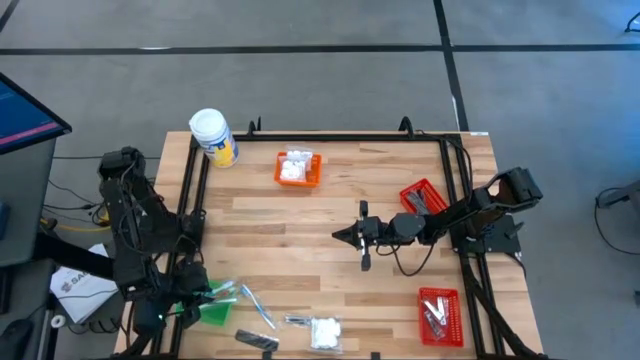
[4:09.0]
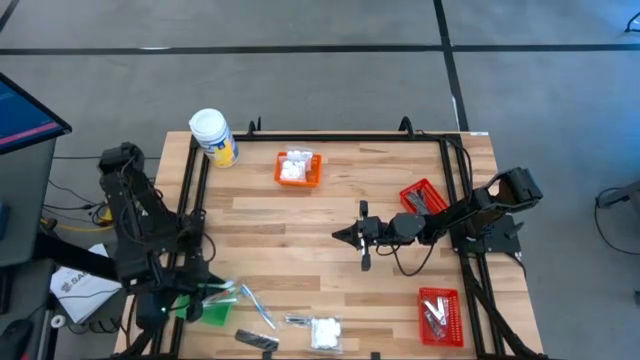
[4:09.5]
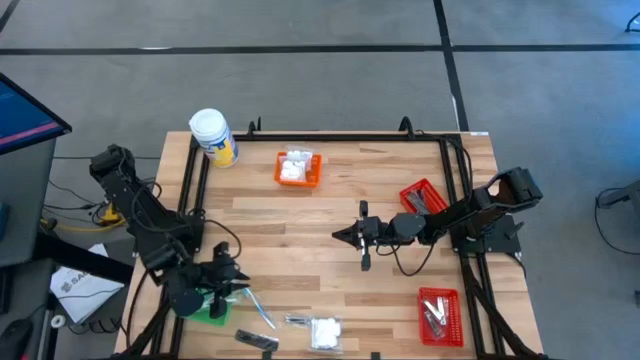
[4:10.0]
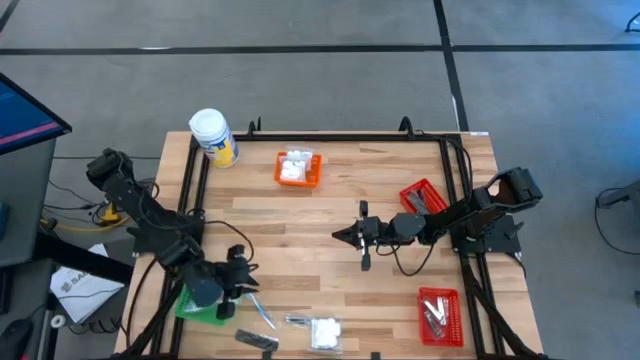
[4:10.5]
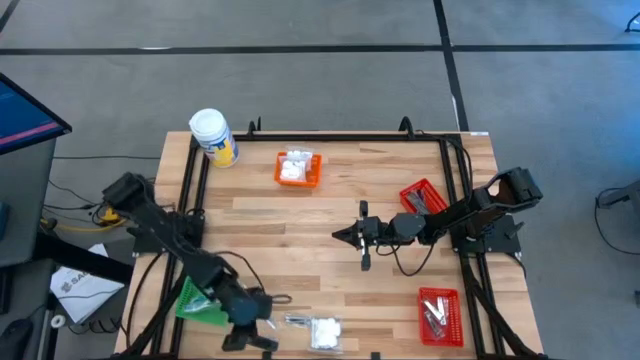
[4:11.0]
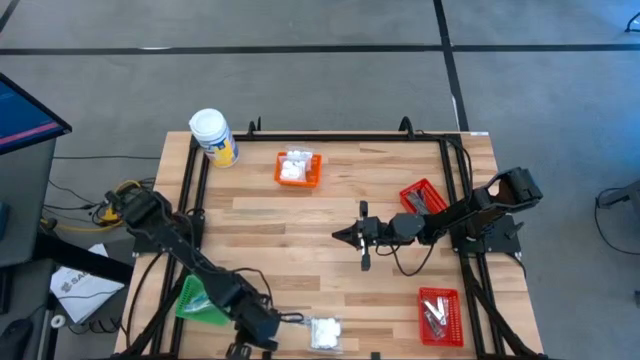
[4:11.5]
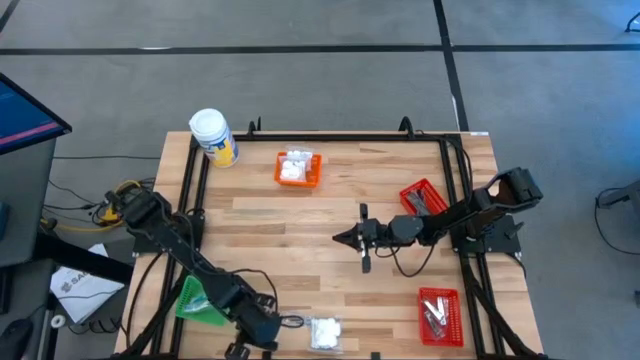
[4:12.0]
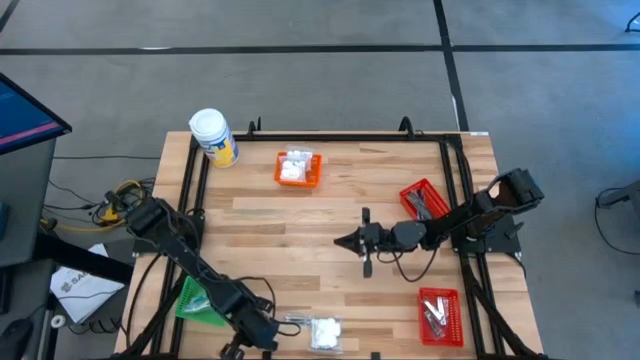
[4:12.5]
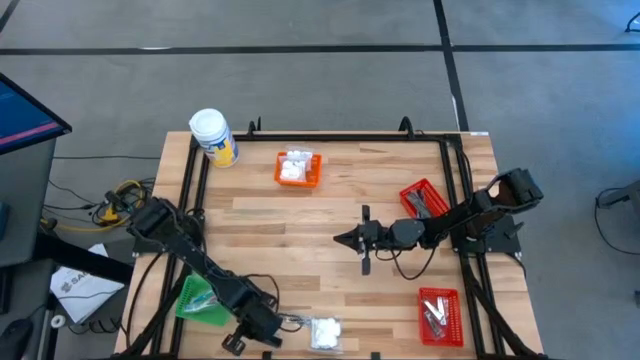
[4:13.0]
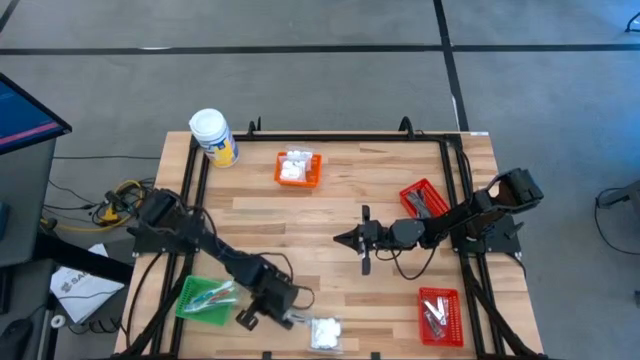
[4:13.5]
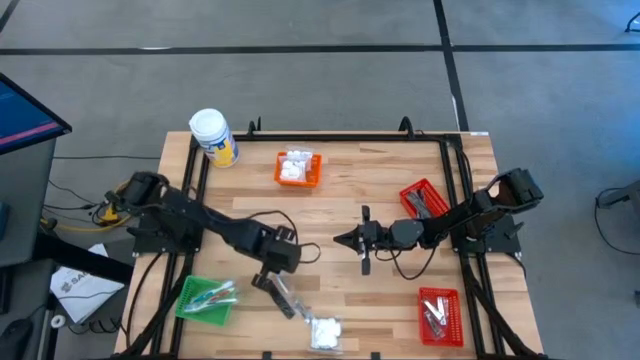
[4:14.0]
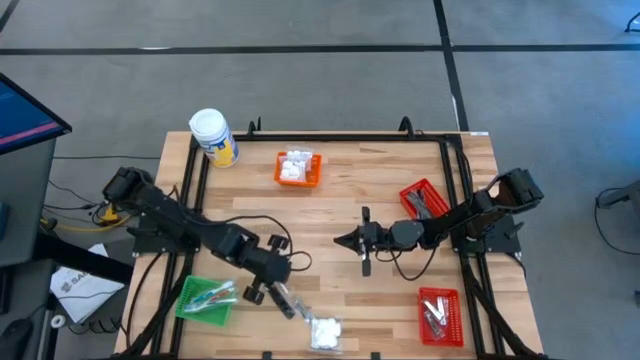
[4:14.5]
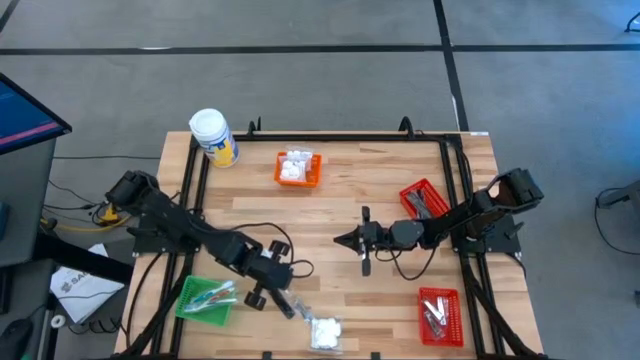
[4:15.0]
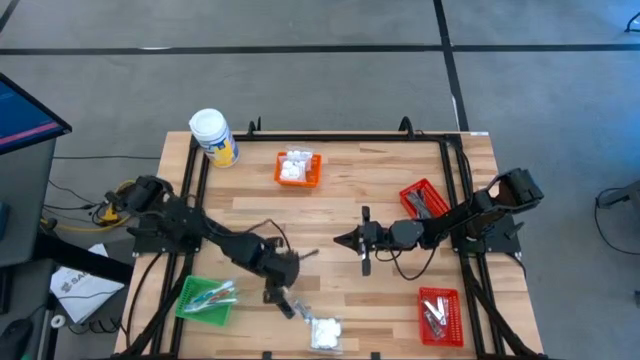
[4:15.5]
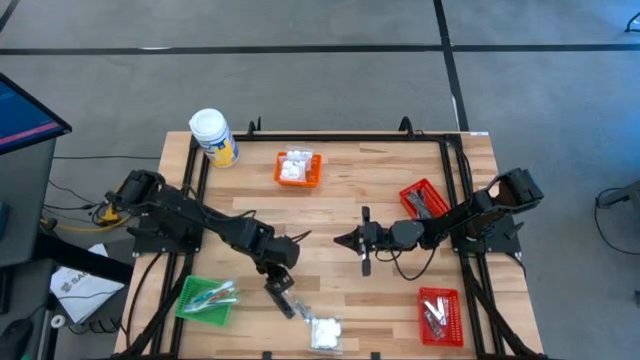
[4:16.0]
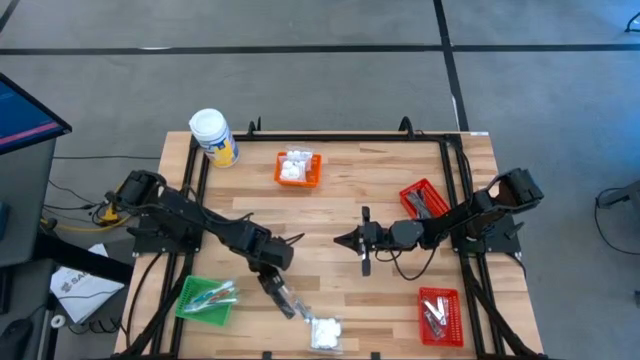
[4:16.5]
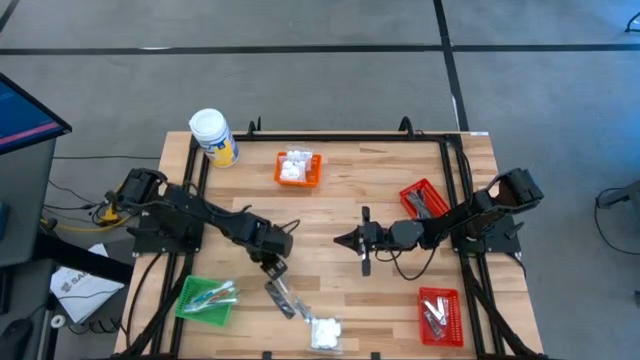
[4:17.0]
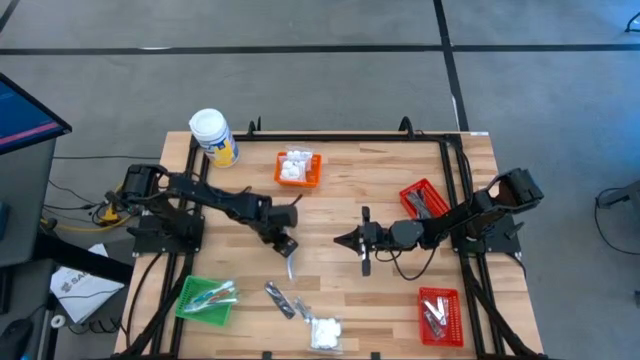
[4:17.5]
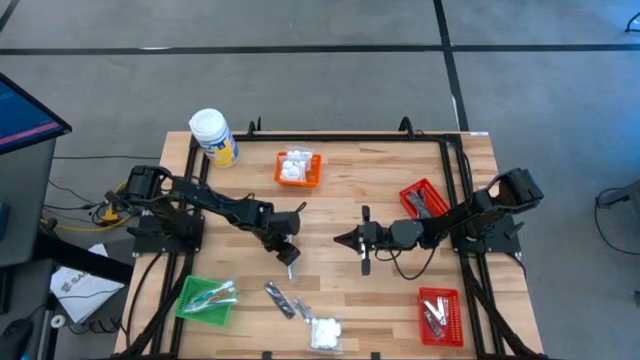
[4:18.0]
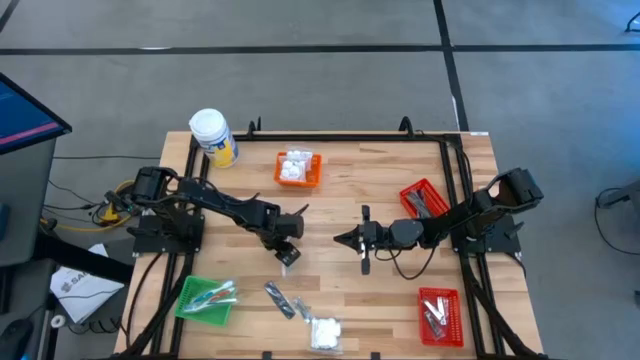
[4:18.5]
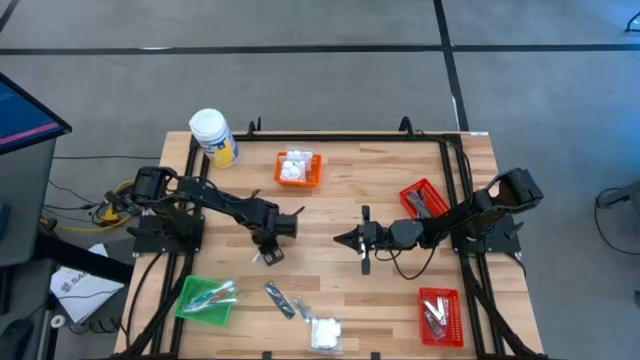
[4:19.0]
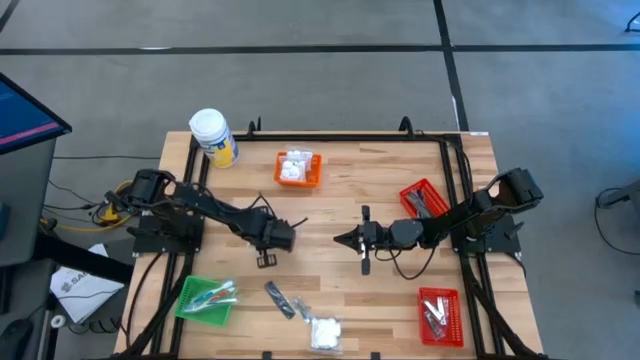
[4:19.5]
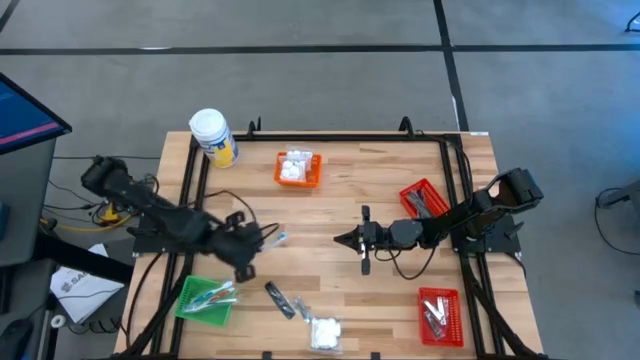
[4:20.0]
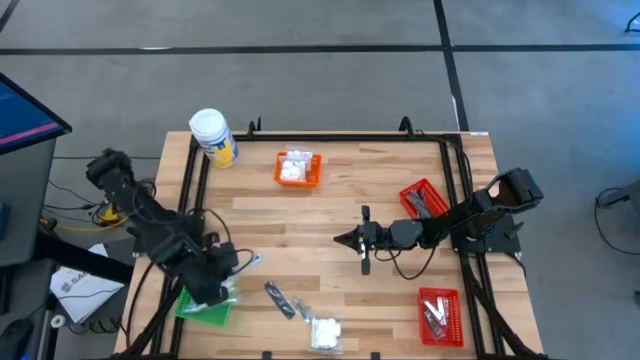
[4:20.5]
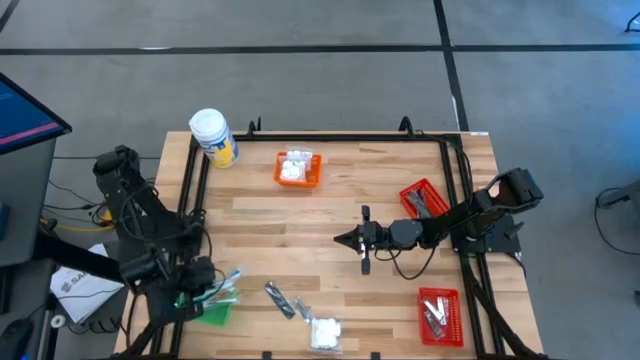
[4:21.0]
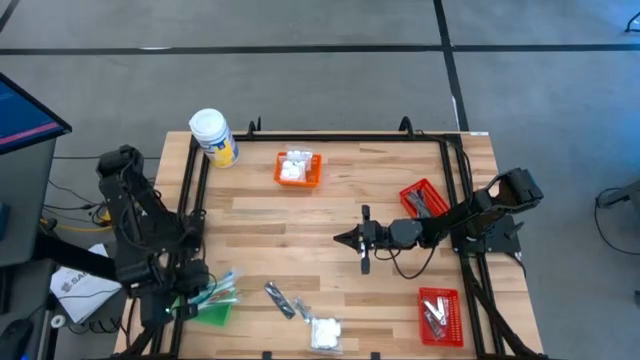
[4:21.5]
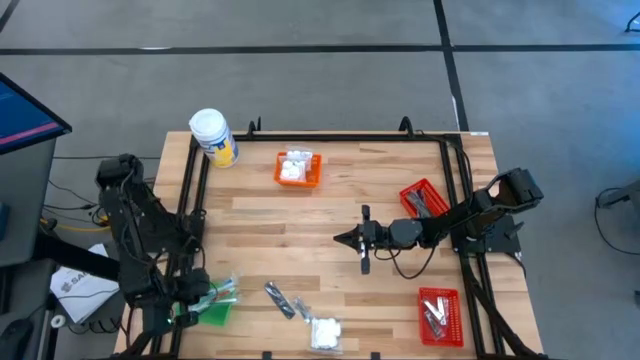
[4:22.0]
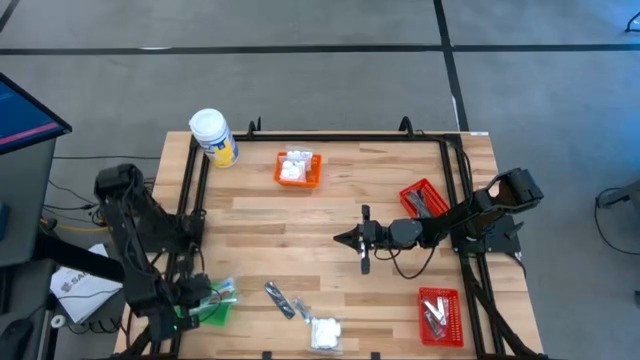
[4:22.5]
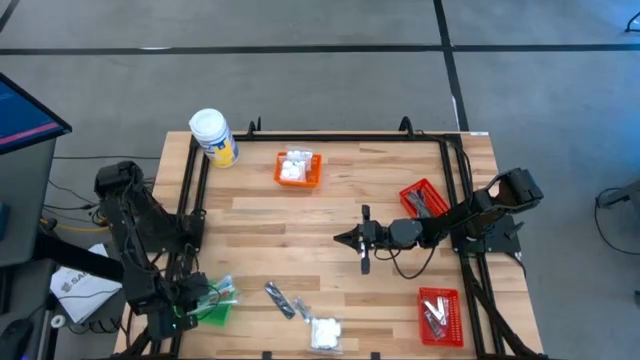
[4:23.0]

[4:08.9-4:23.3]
Task: Pick & Place Travel size toiletries
Put the light blue toothbrush into the green basket

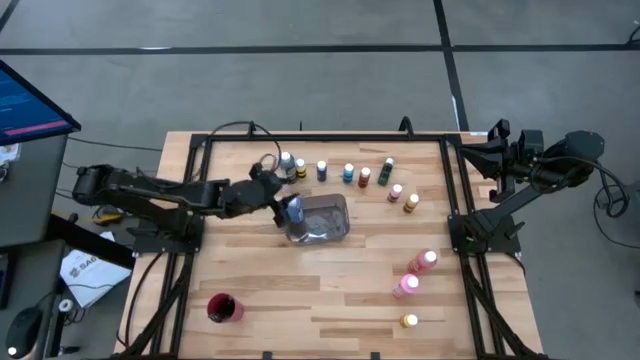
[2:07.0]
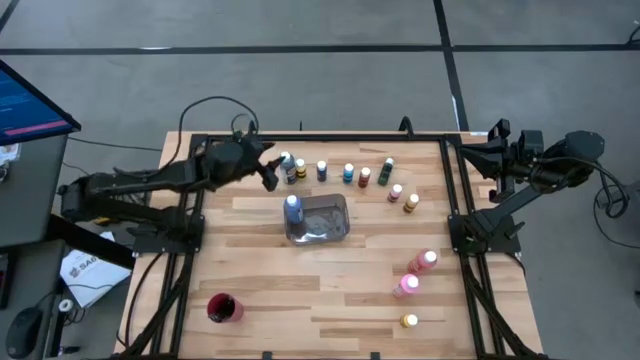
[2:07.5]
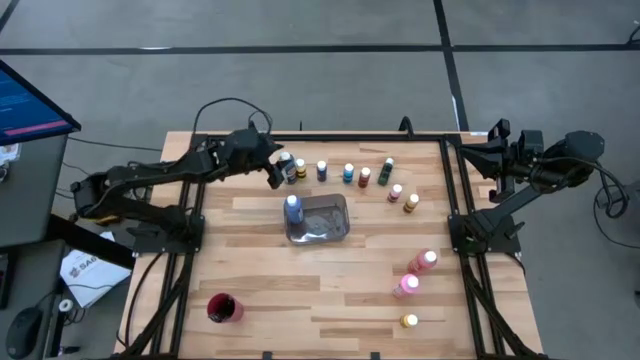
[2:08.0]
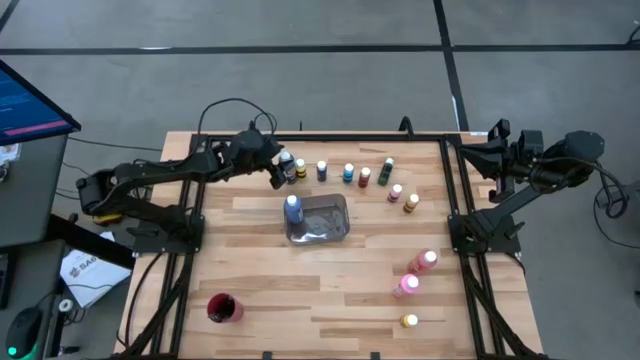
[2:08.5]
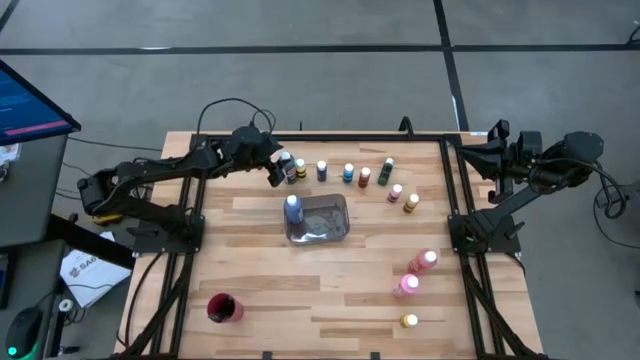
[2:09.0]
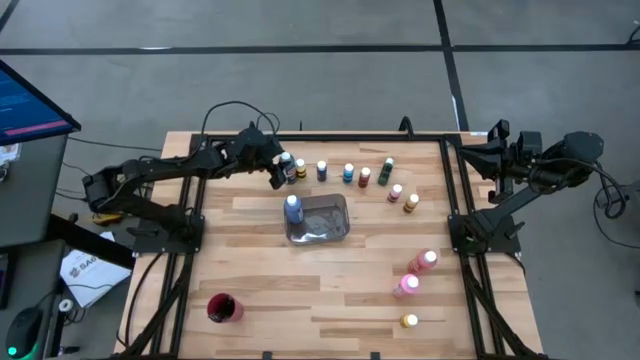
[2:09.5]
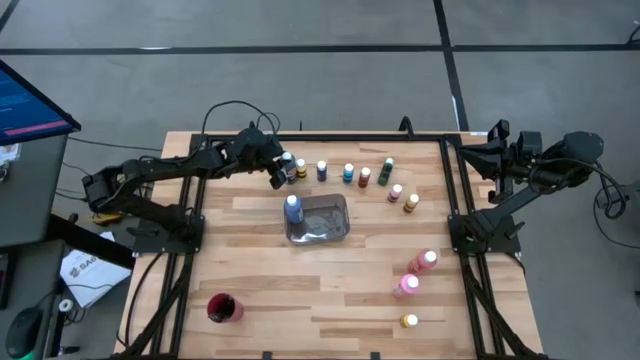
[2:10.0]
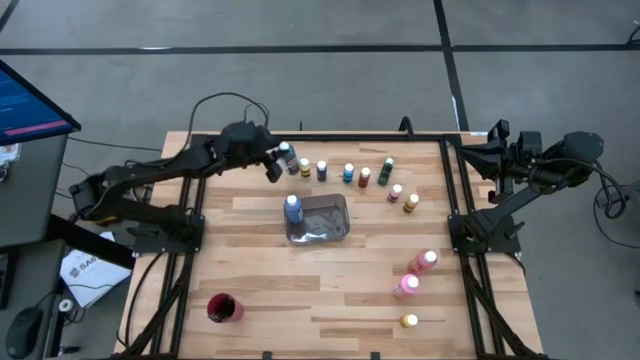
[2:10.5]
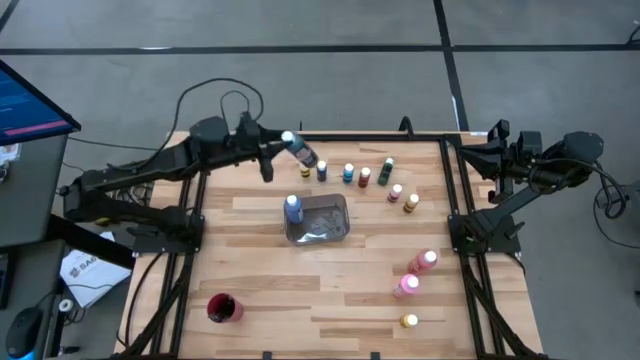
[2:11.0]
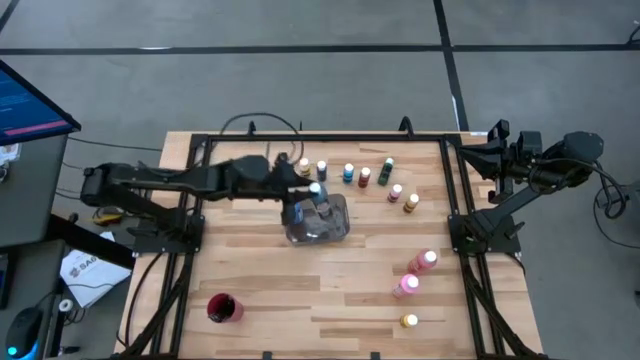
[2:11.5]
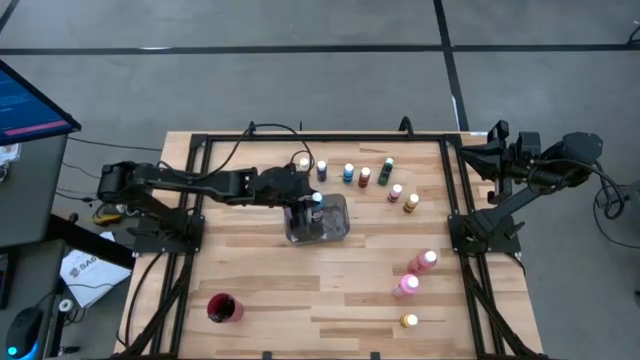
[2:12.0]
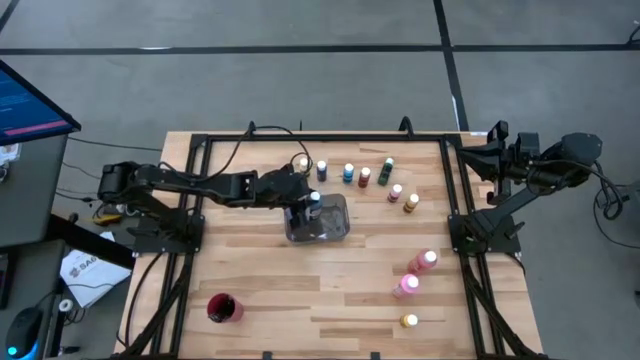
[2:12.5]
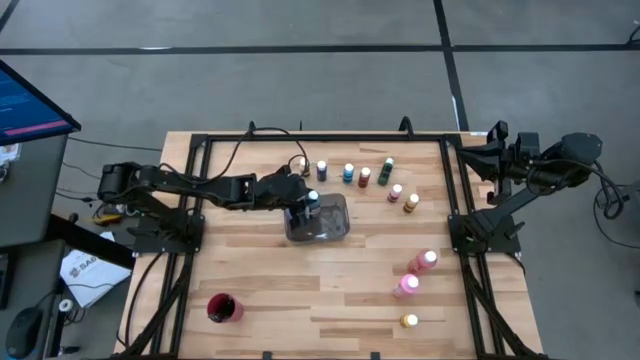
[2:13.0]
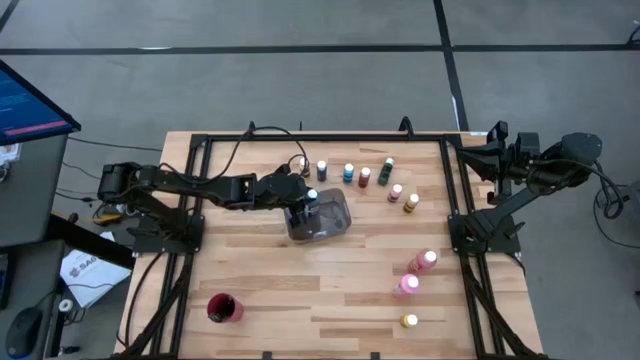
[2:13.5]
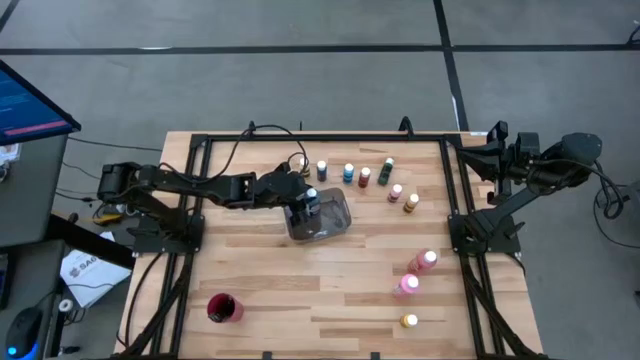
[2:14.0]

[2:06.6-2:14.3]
Task: Pick & Place Paint Supplies
Put the large blue paint bottle into the black bin
